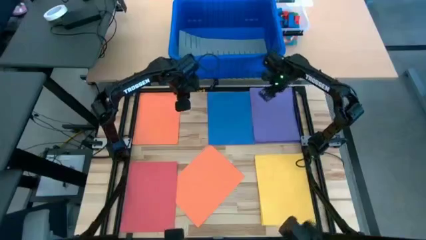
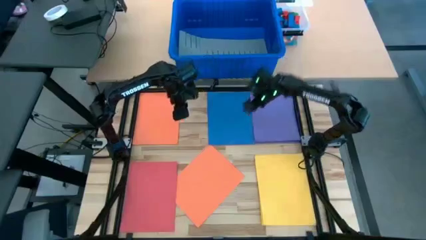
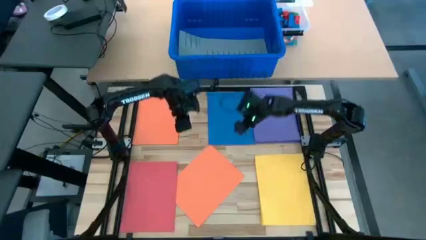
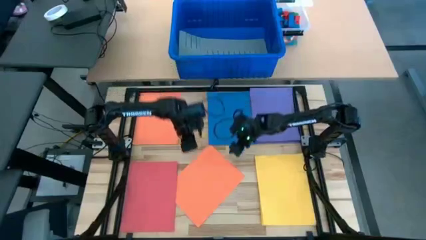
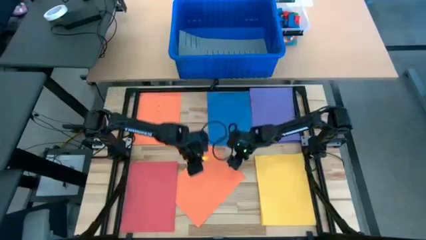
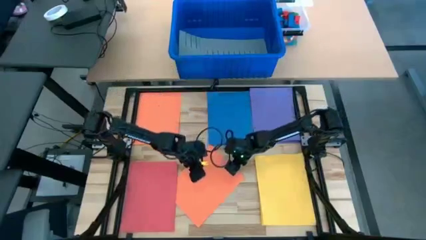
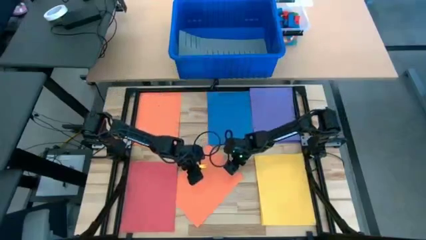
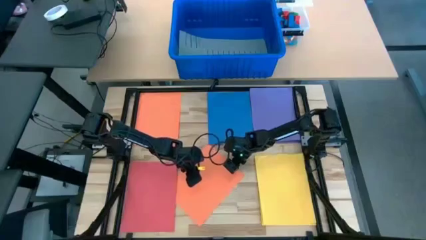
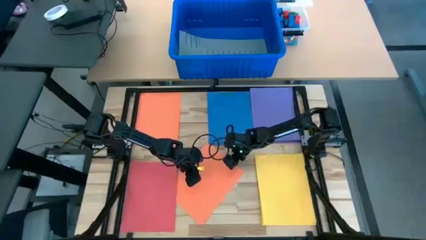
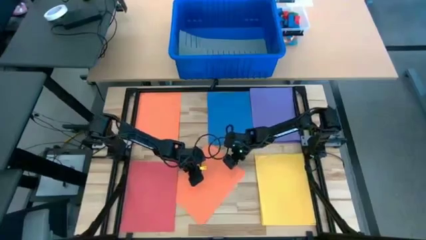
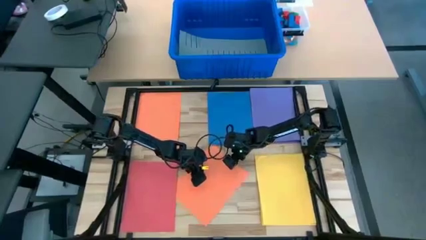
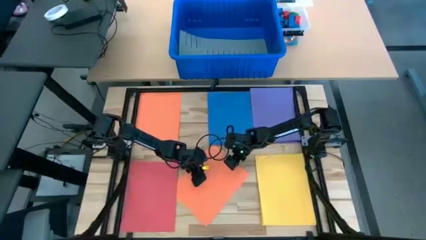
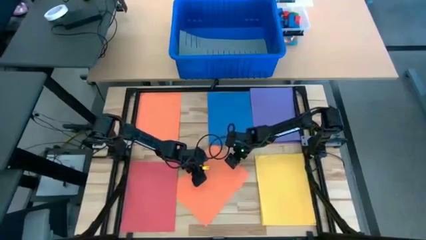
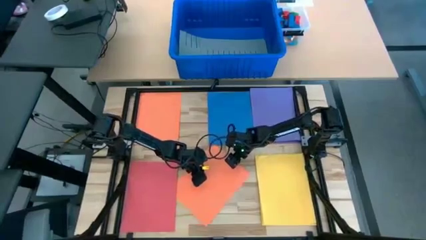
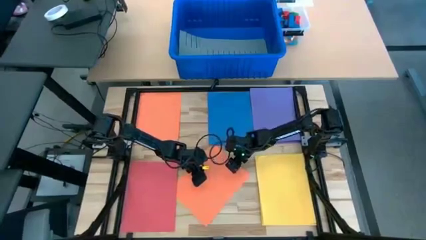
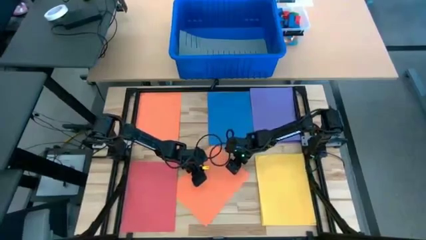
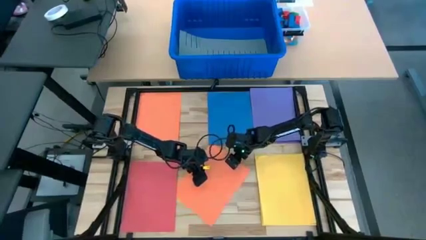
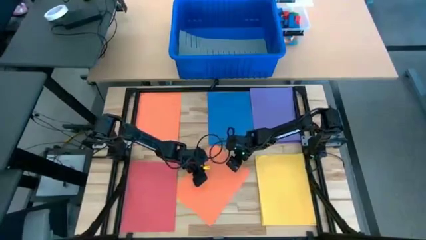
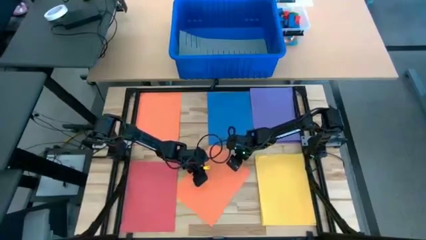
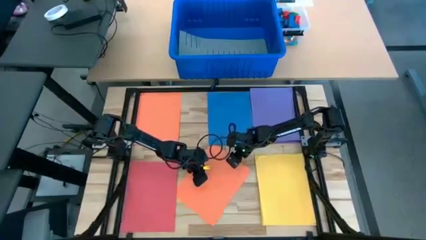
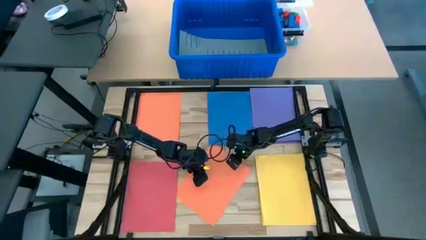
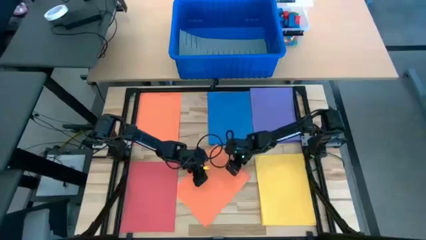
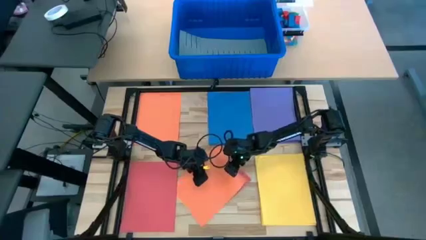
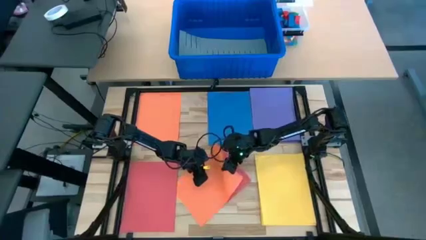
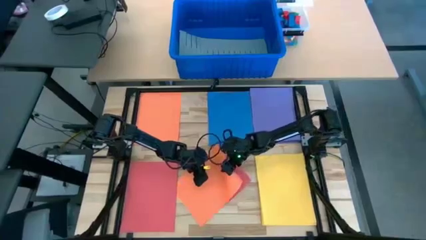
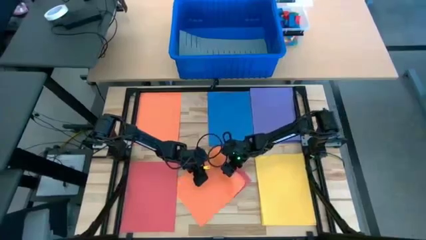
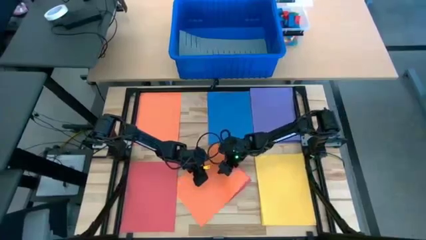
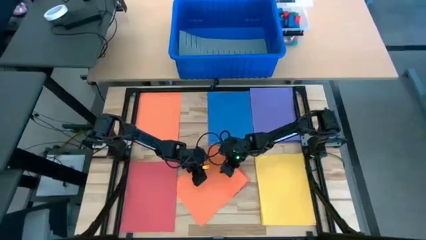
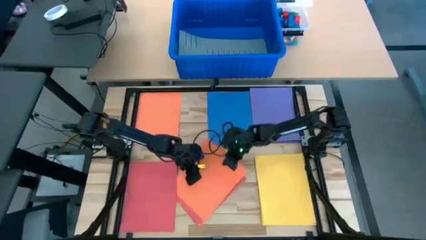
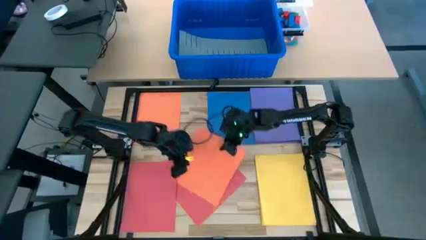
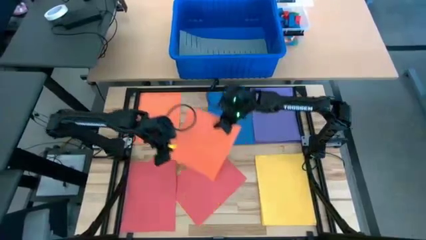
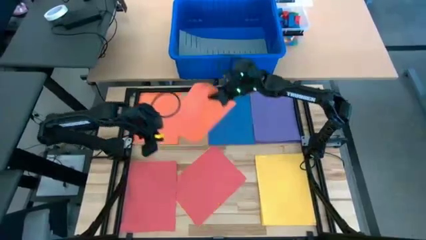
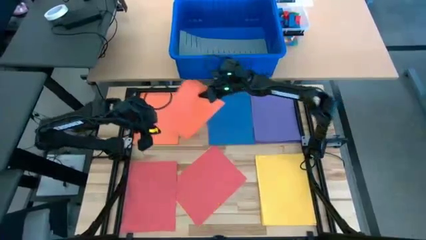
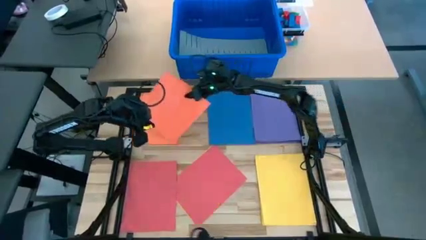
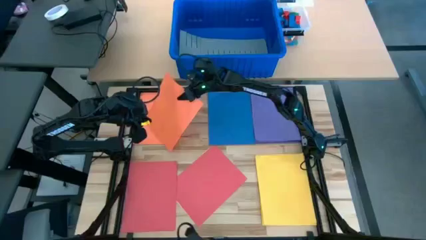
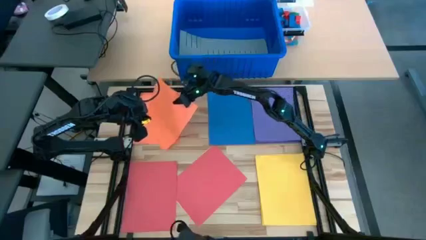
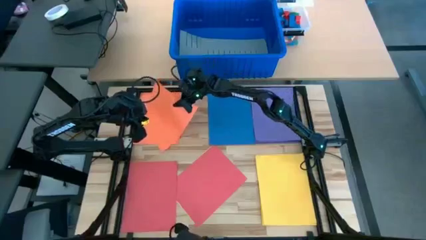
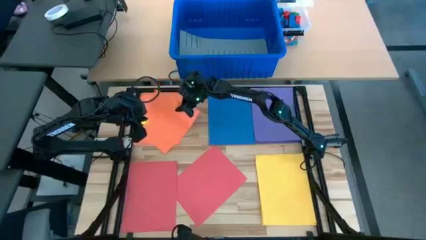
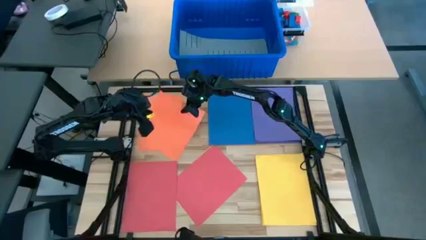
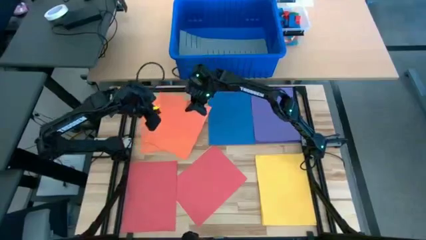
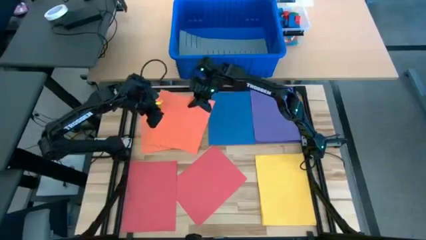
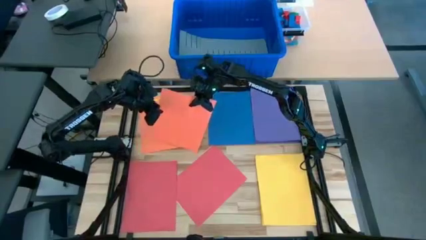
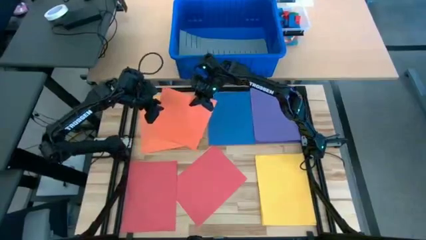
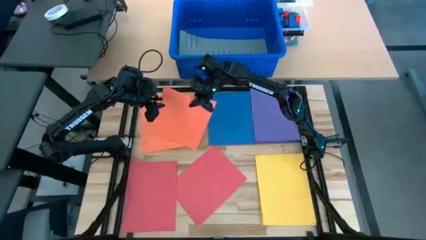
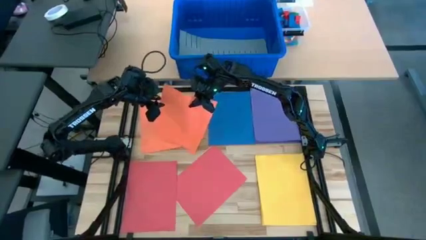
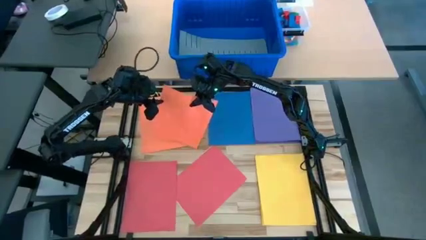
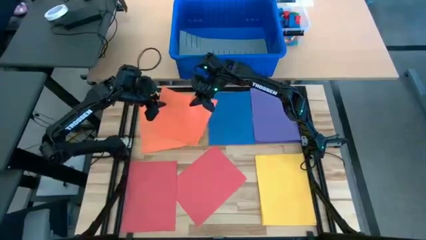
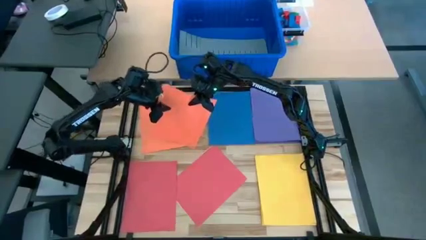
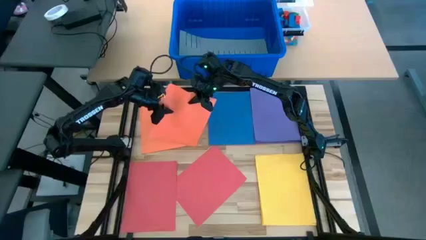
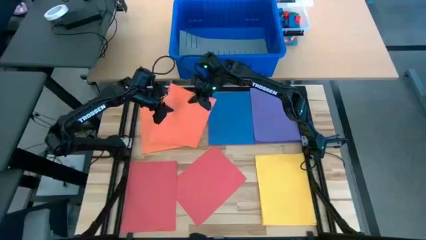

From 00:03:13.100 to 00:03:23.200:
Task: Organize paper
Stack the orange paper on top of the other orange paper
